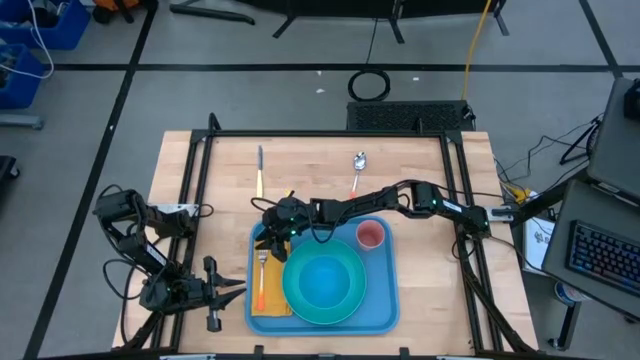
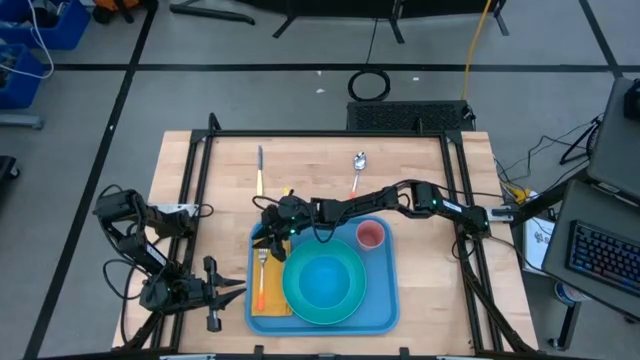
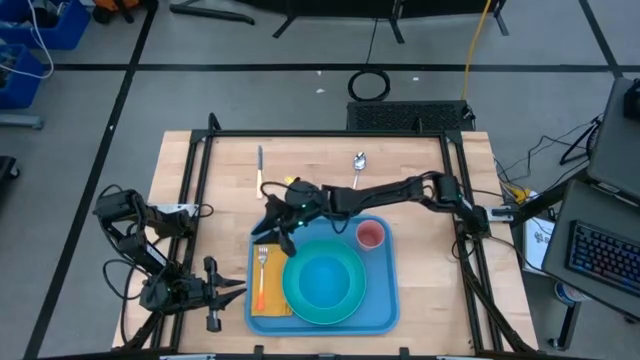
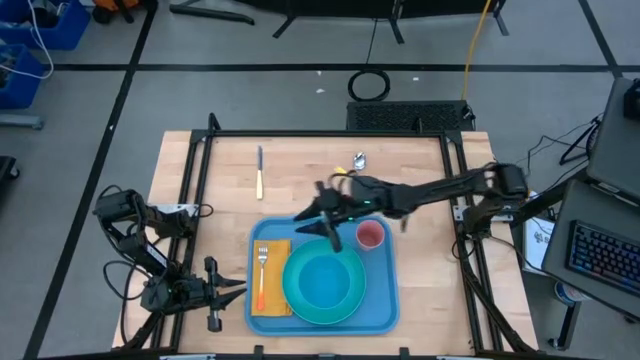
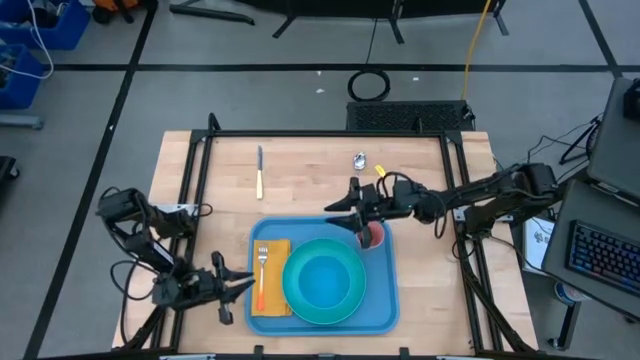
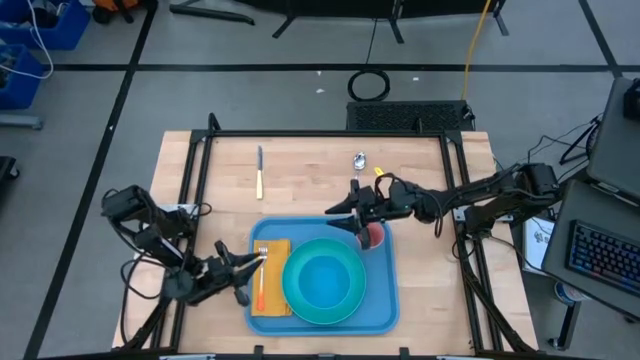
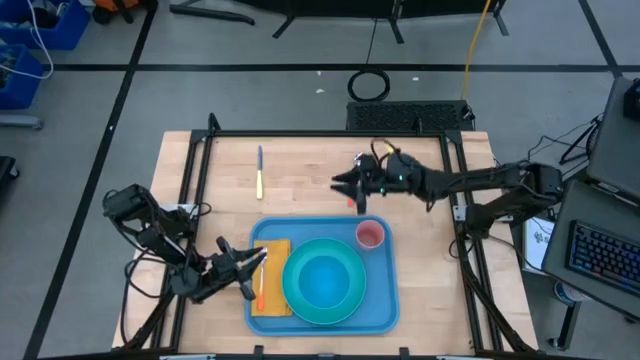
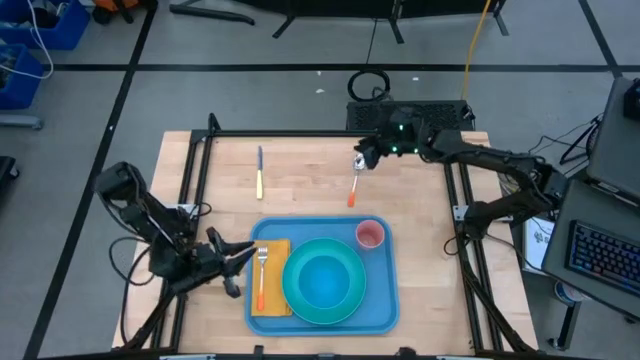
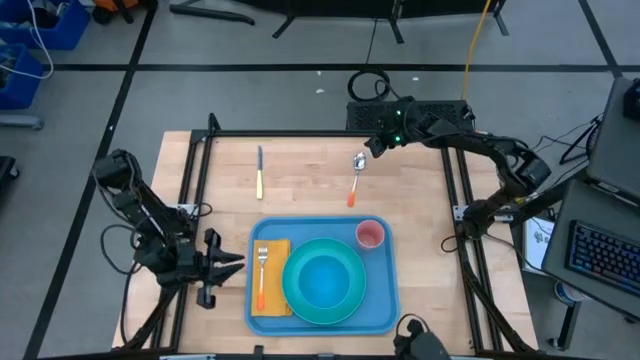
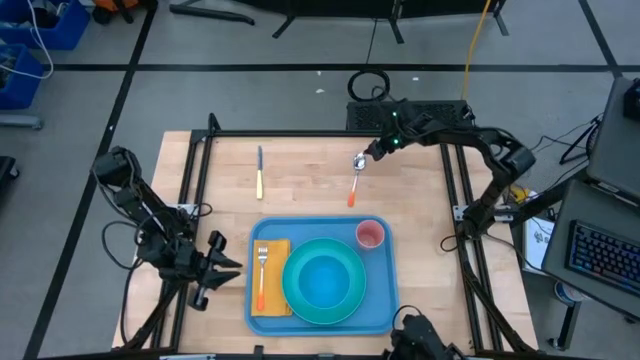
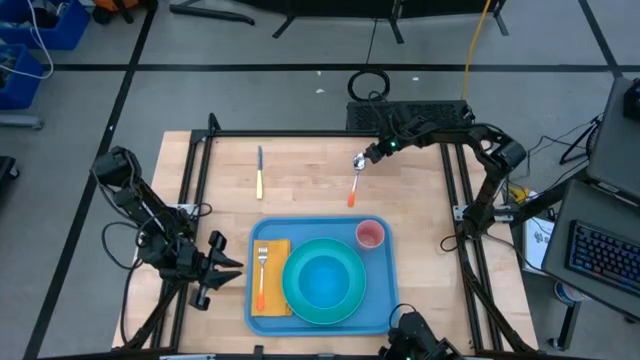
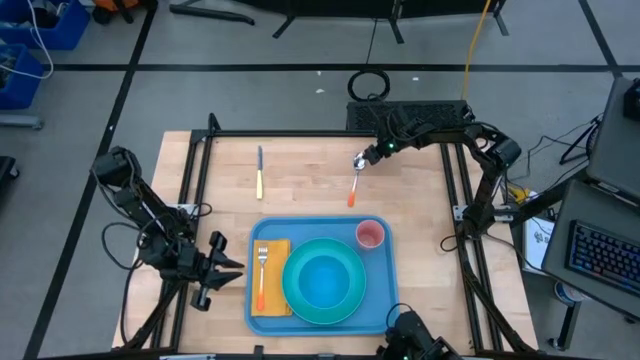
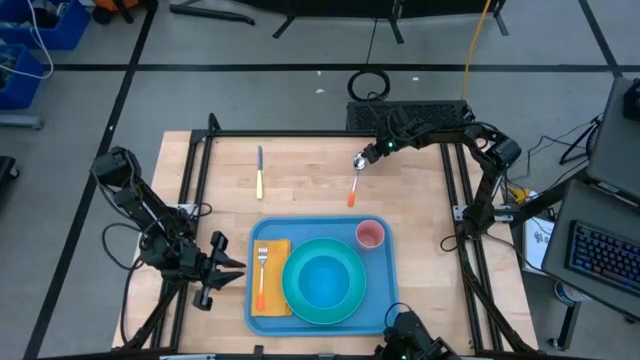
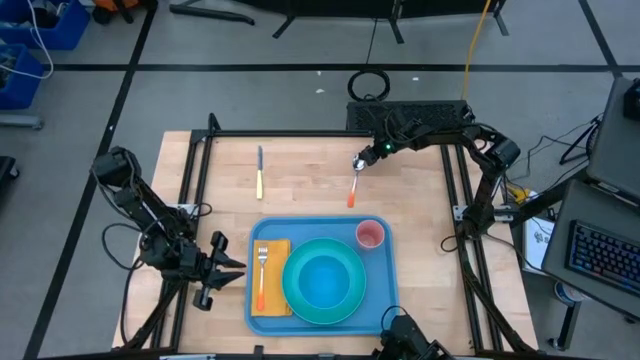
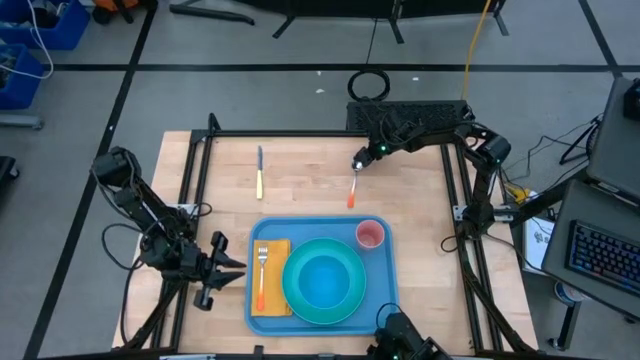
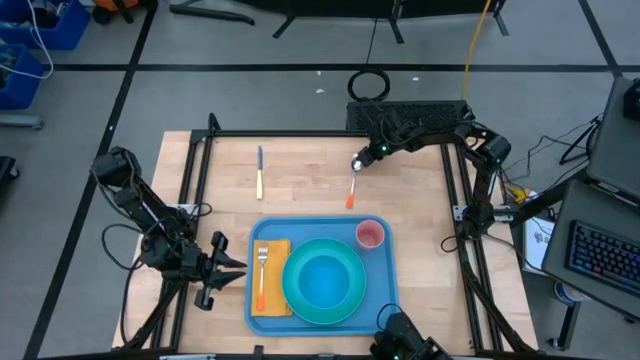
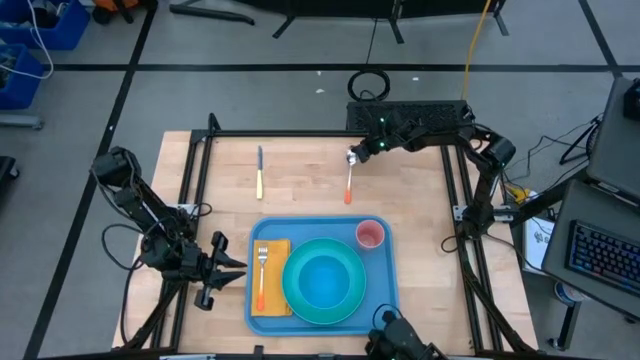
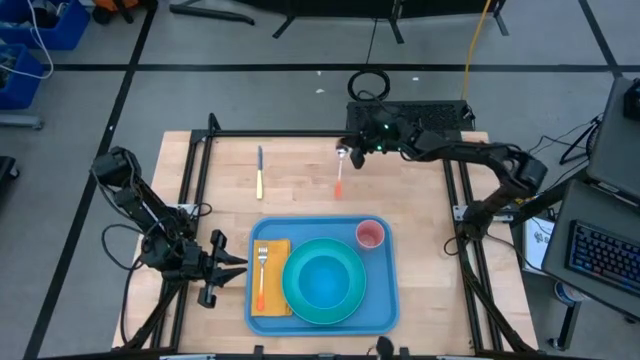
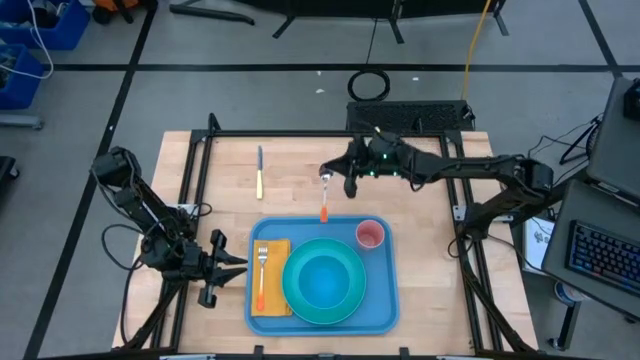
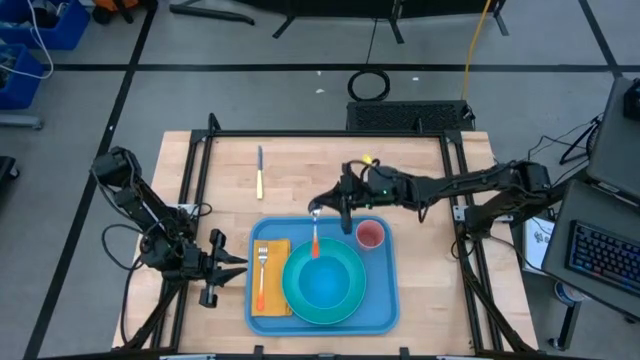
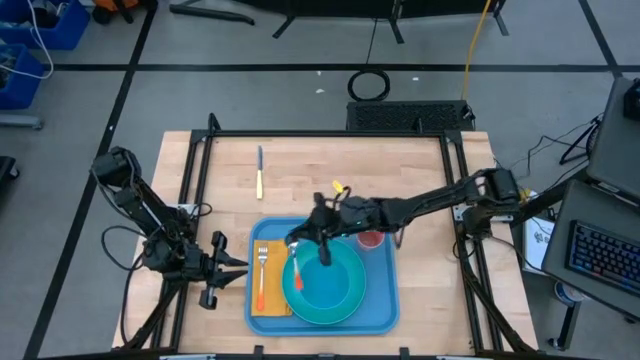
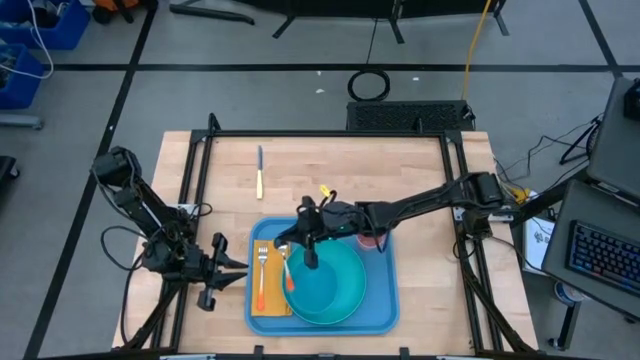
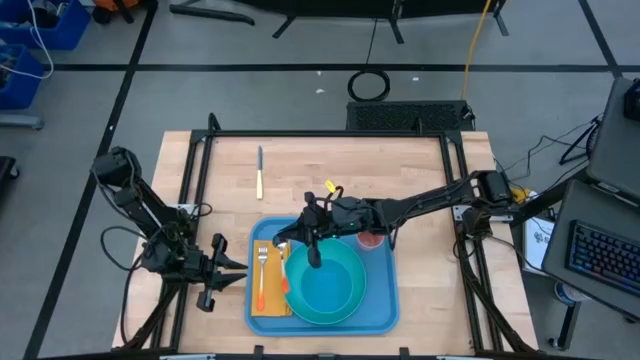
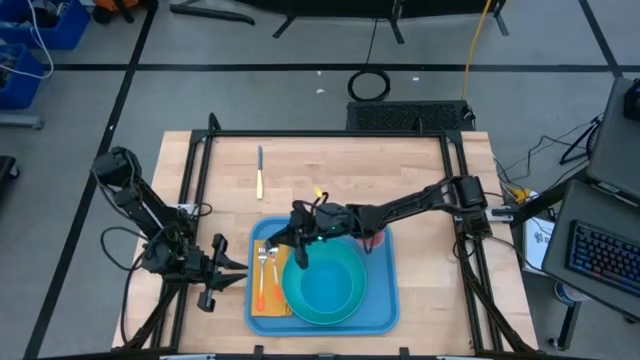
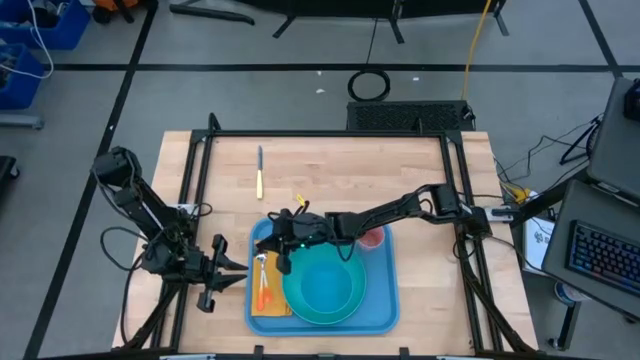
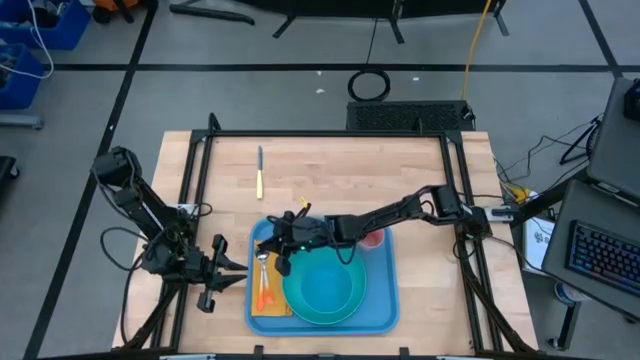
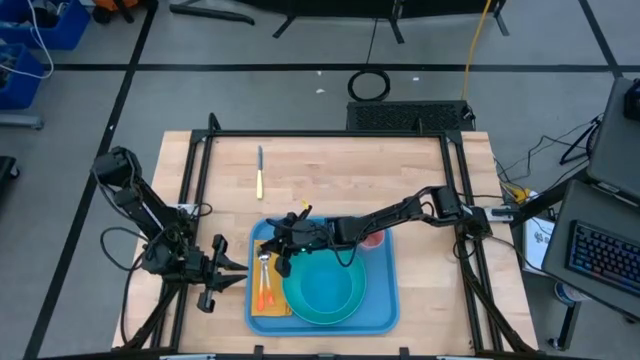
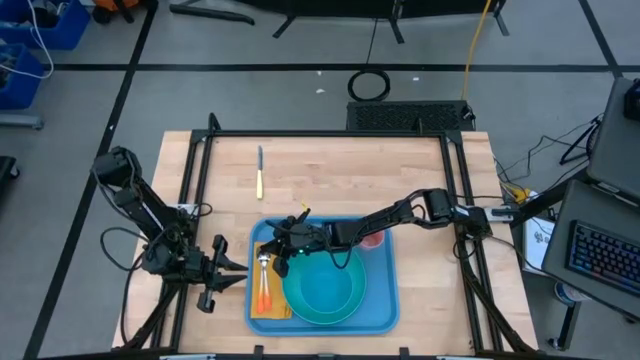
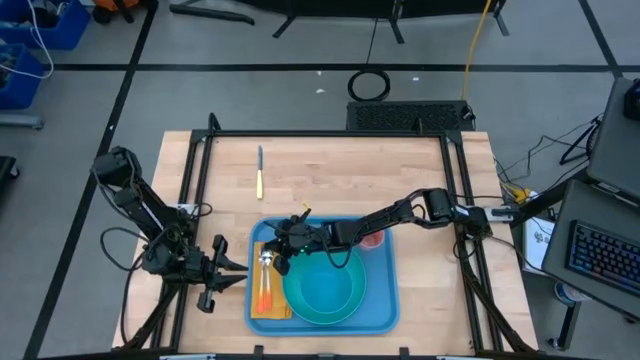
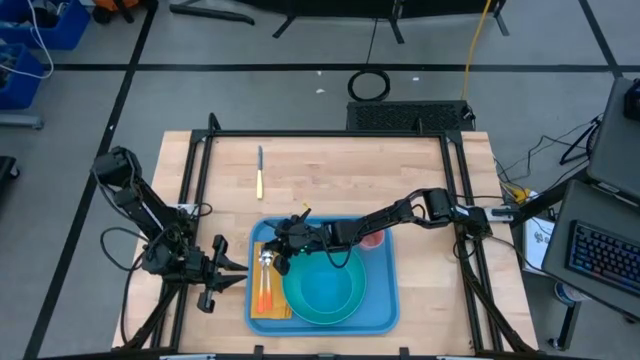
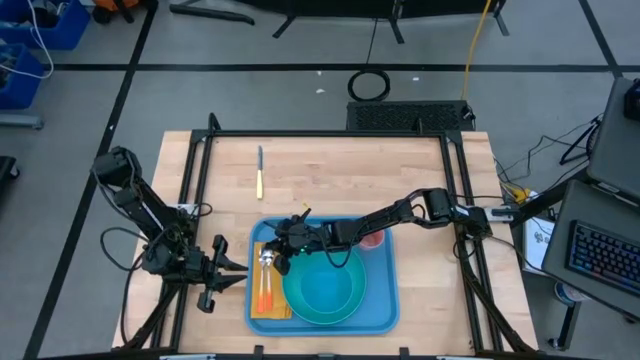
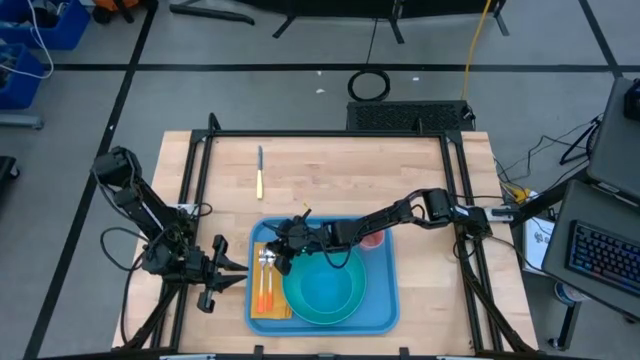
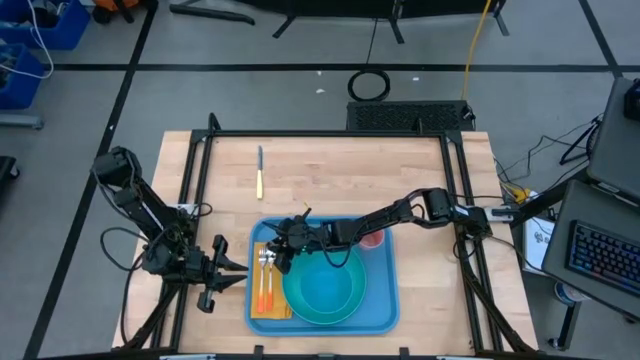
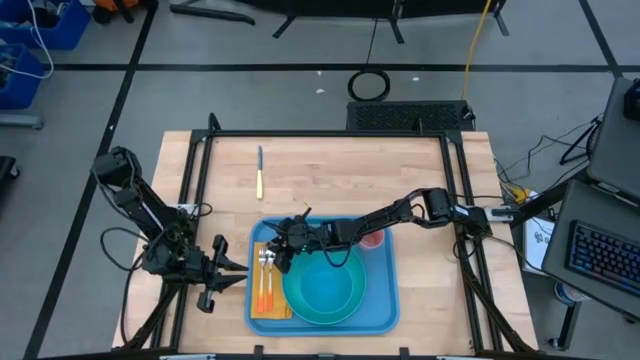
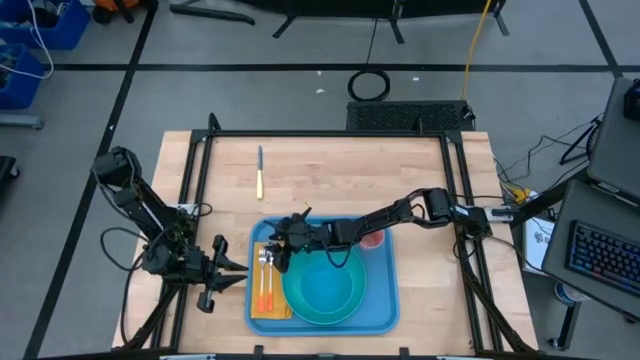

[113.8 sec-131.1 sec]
Task: Set up tray
Put the orange spoon on top of the yellow napkin

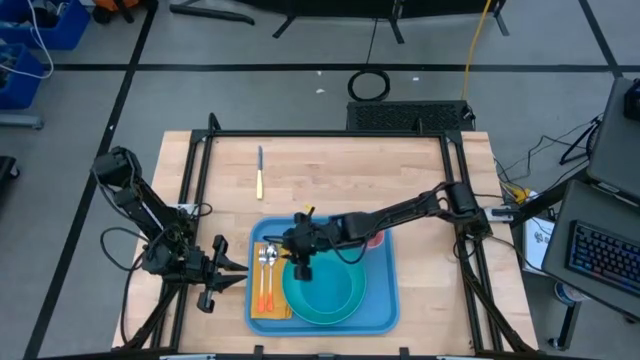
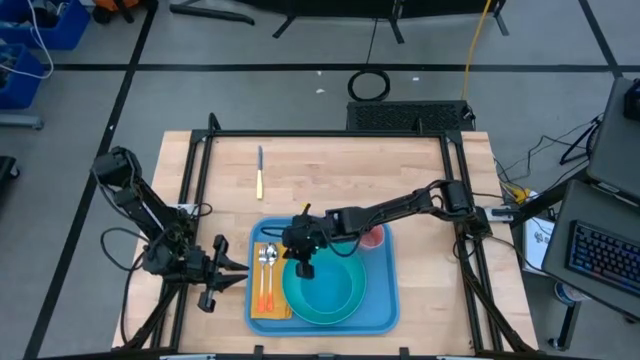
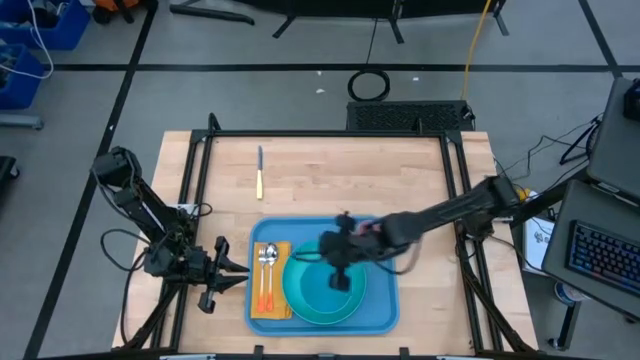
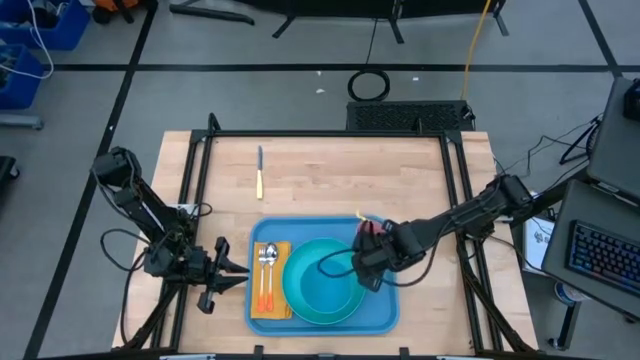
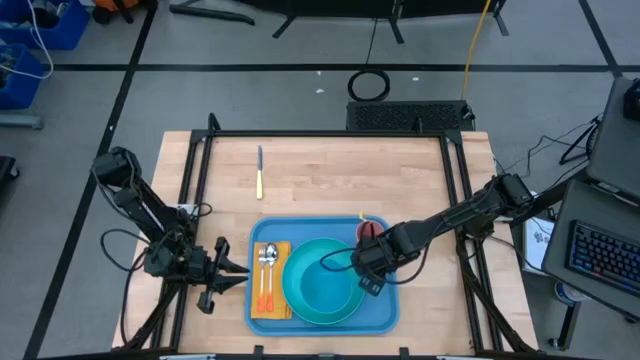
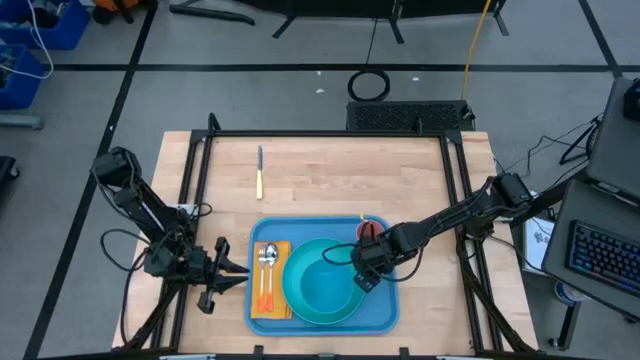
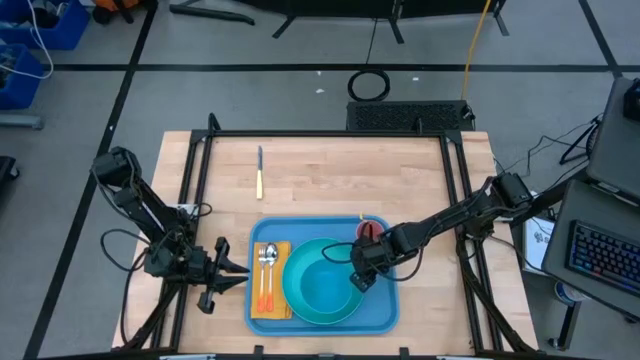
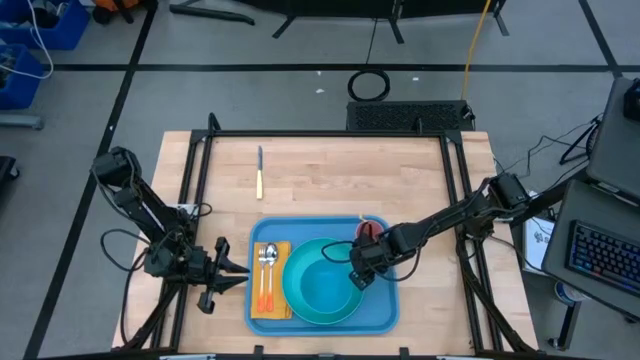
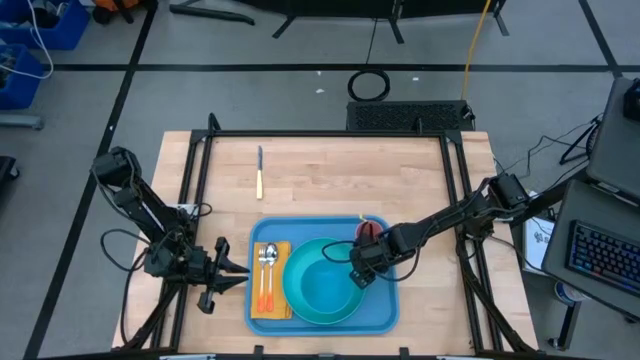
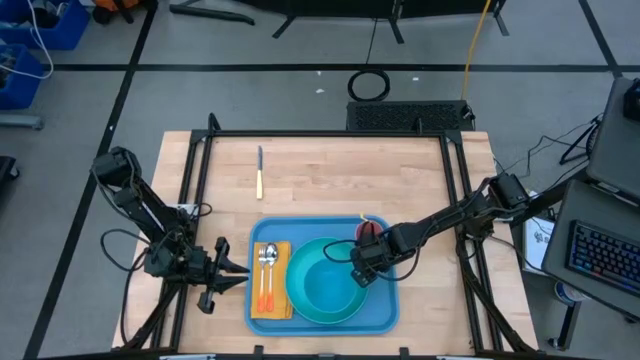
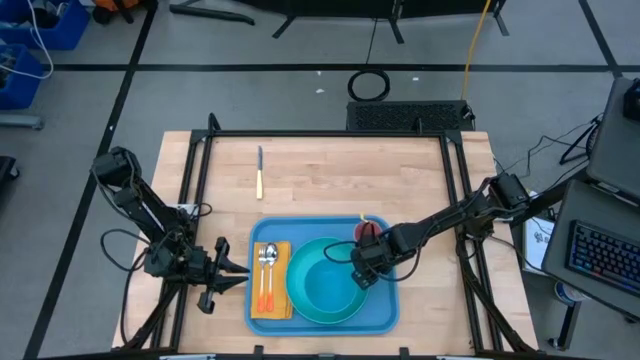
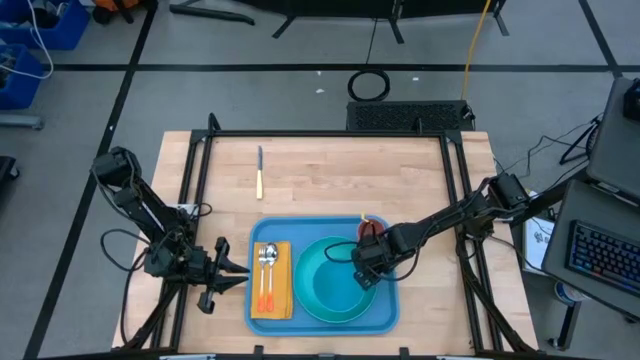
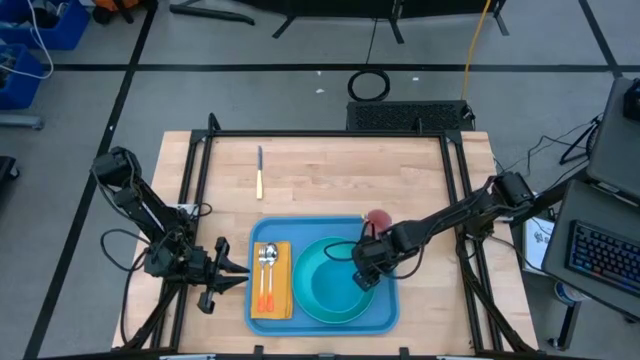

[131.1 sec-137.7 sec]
Adjust the light blue plate on the blue tray
